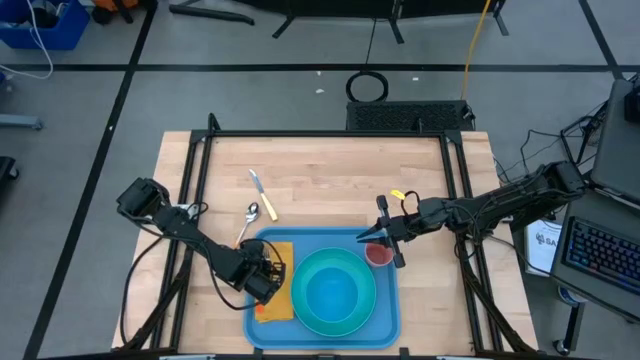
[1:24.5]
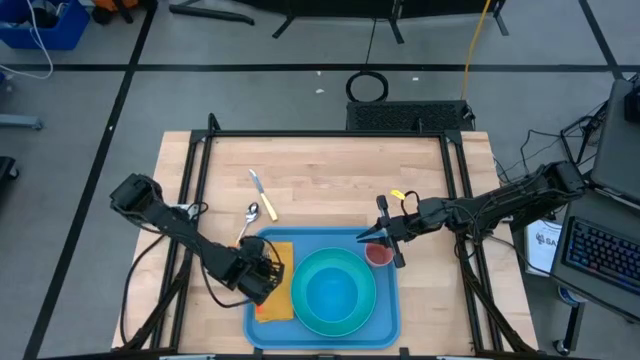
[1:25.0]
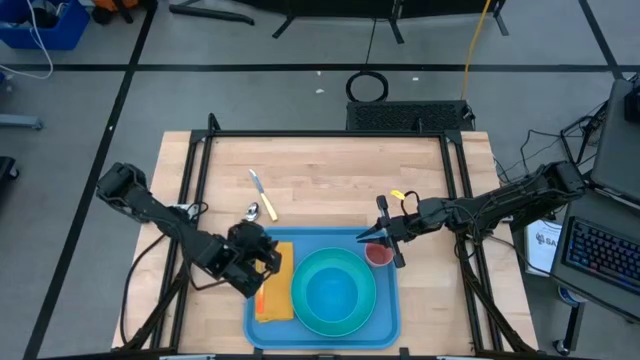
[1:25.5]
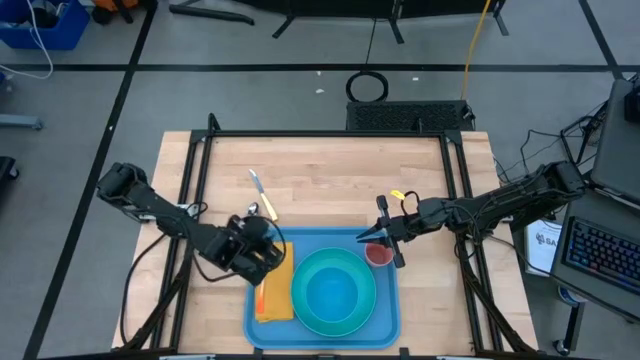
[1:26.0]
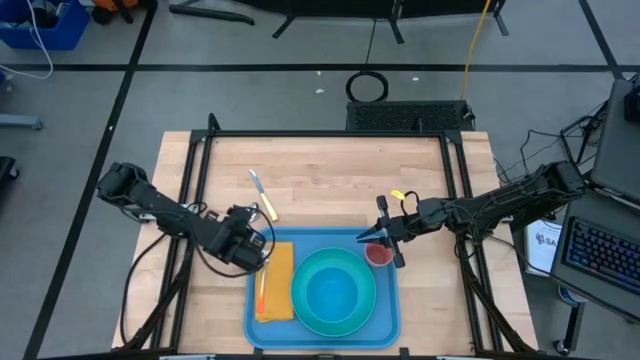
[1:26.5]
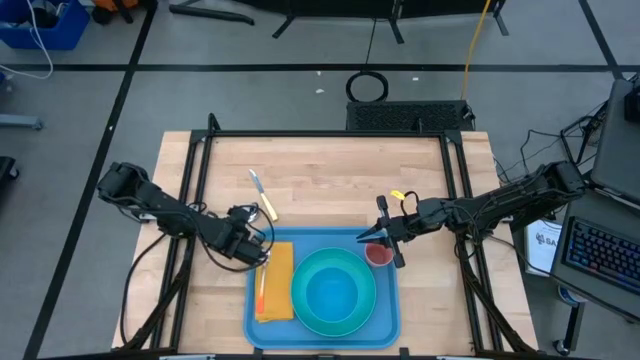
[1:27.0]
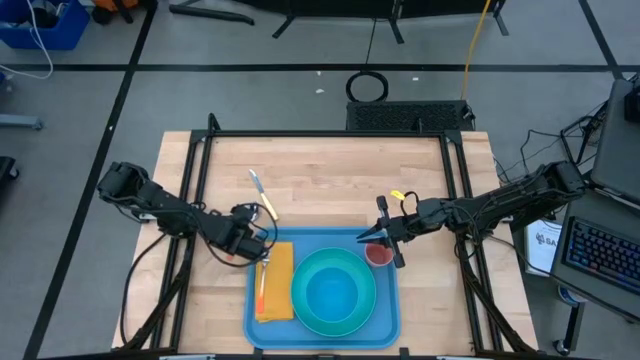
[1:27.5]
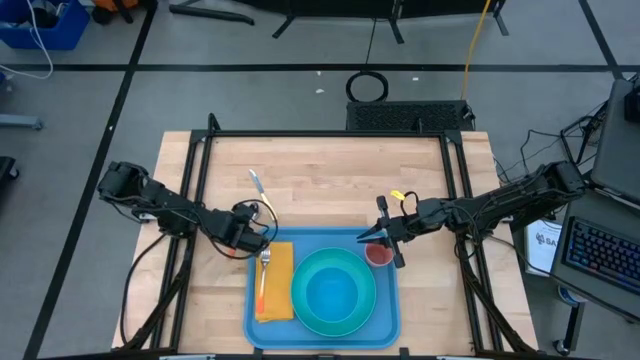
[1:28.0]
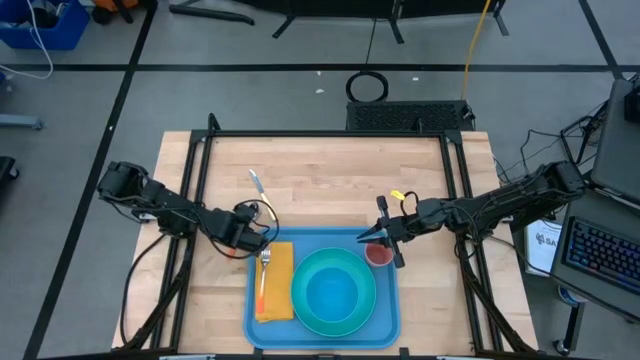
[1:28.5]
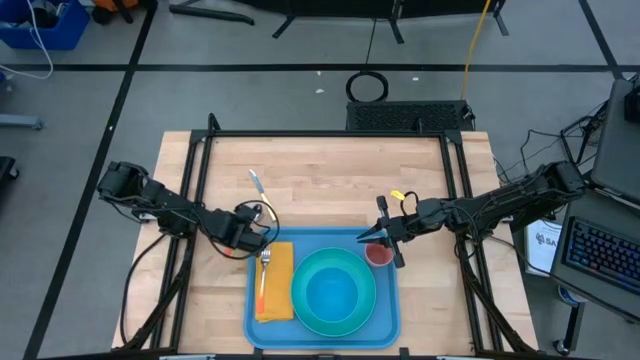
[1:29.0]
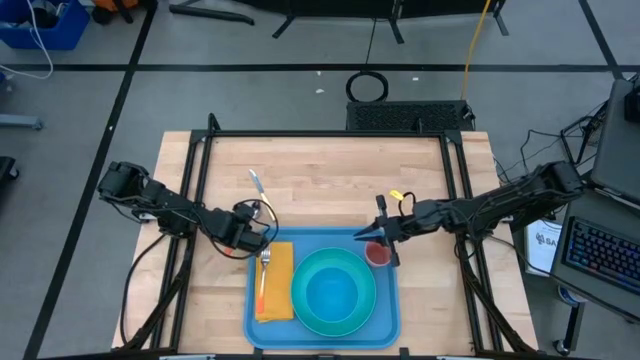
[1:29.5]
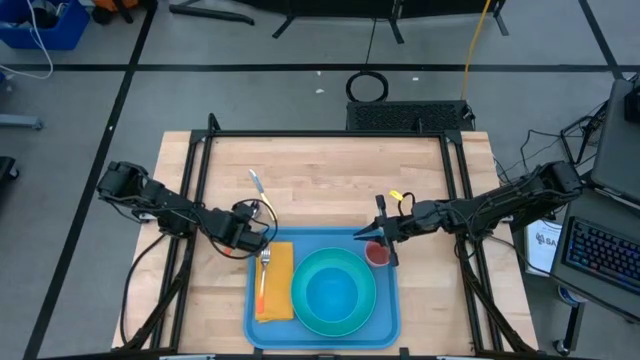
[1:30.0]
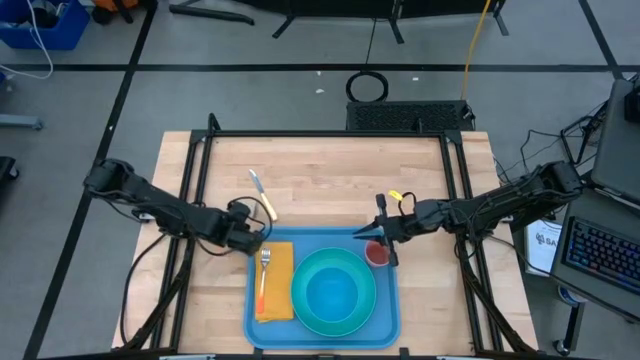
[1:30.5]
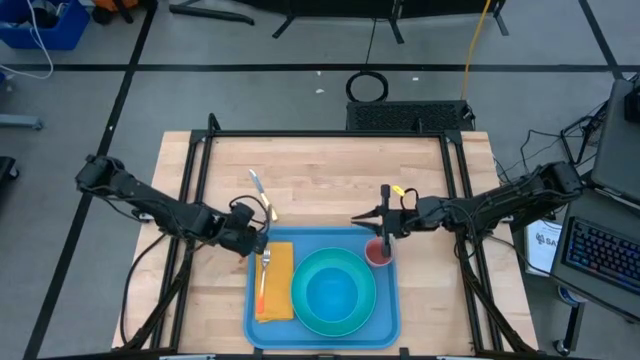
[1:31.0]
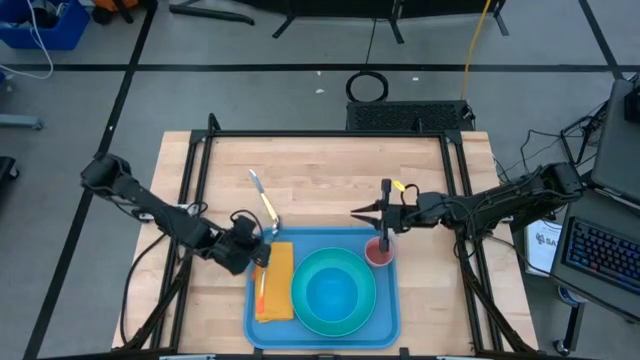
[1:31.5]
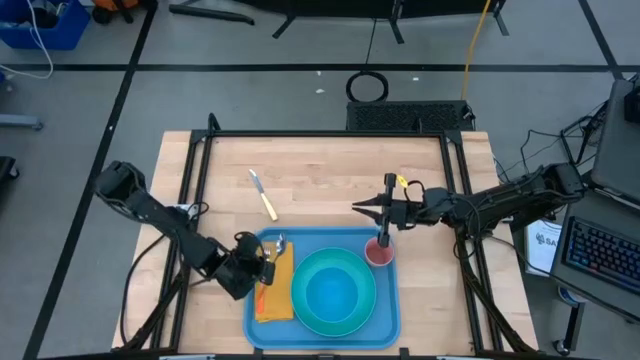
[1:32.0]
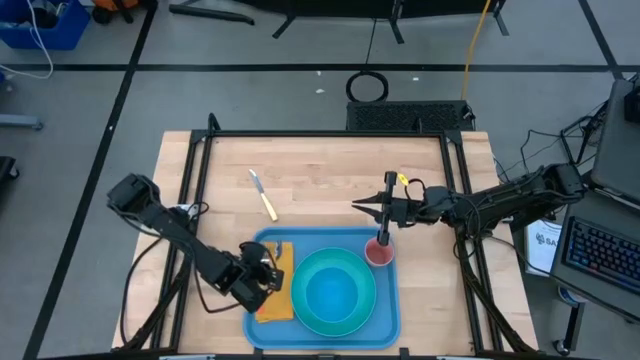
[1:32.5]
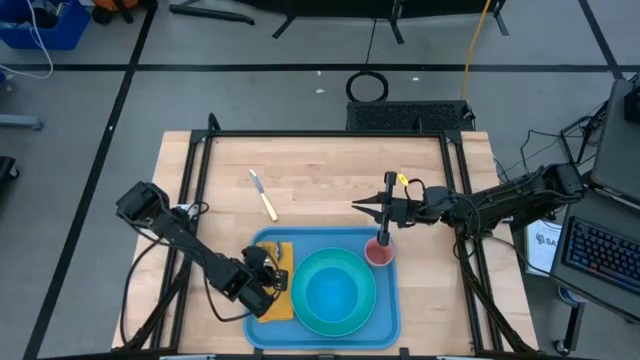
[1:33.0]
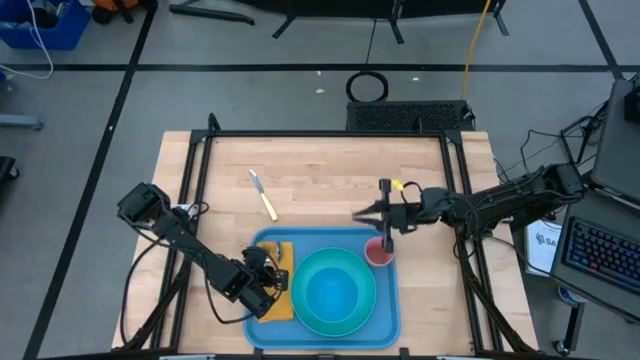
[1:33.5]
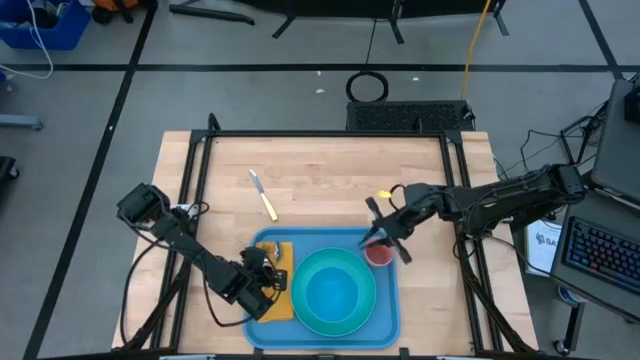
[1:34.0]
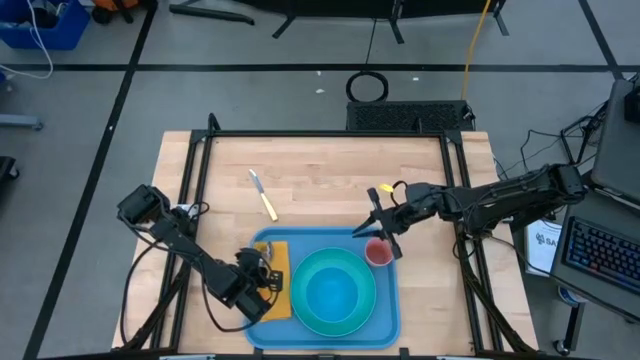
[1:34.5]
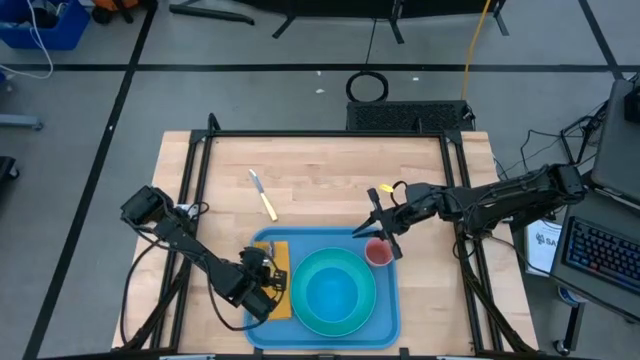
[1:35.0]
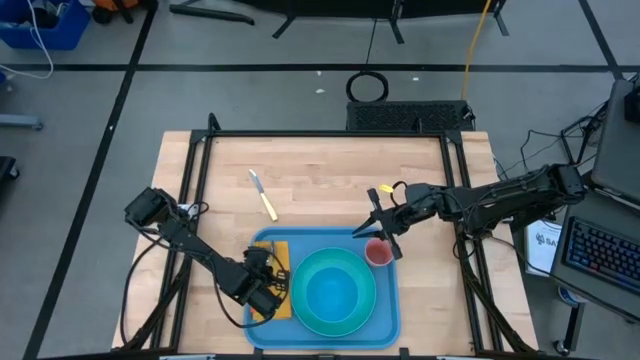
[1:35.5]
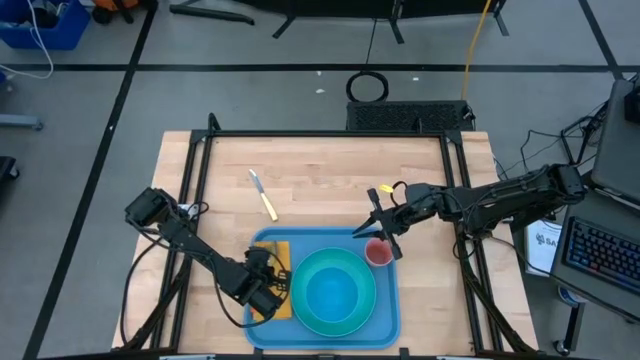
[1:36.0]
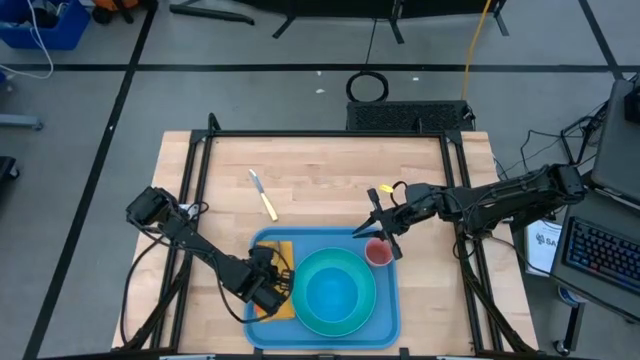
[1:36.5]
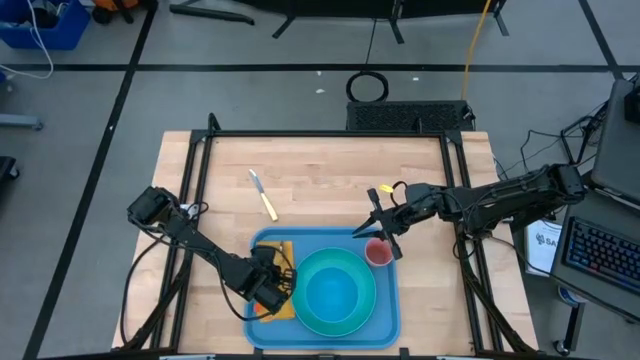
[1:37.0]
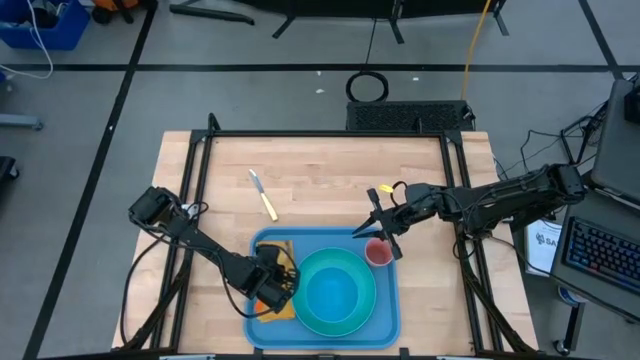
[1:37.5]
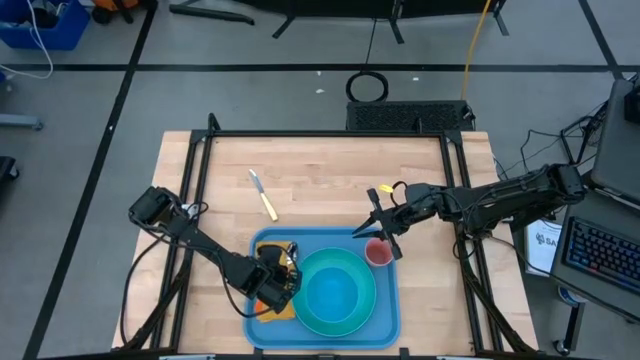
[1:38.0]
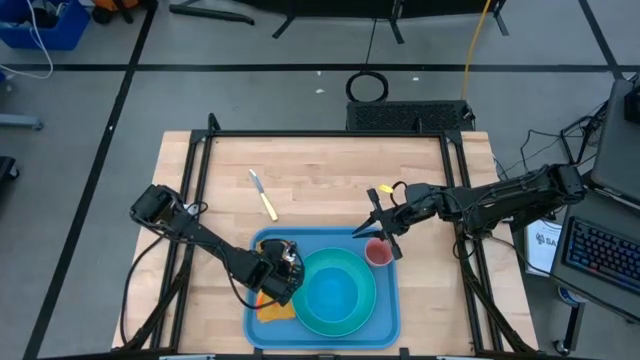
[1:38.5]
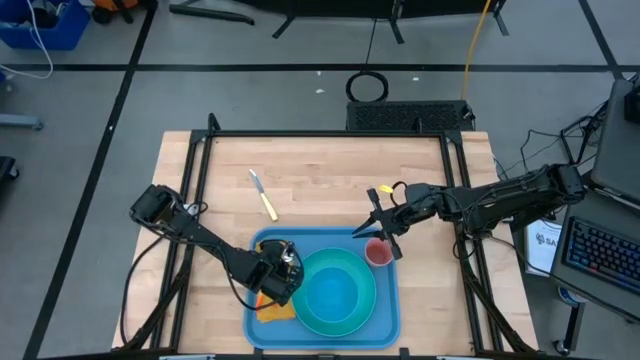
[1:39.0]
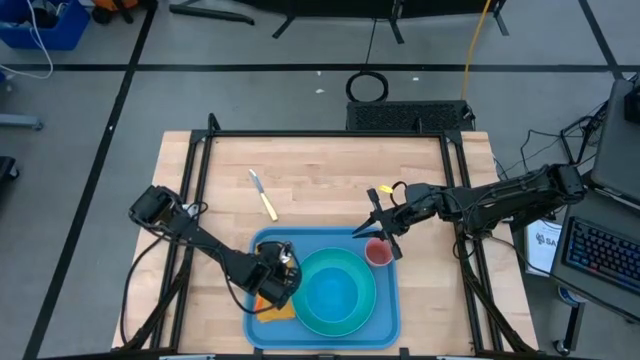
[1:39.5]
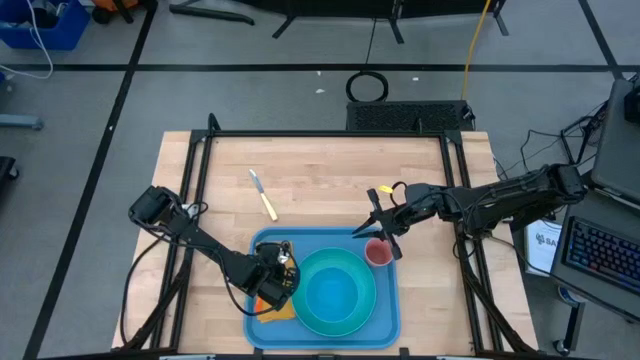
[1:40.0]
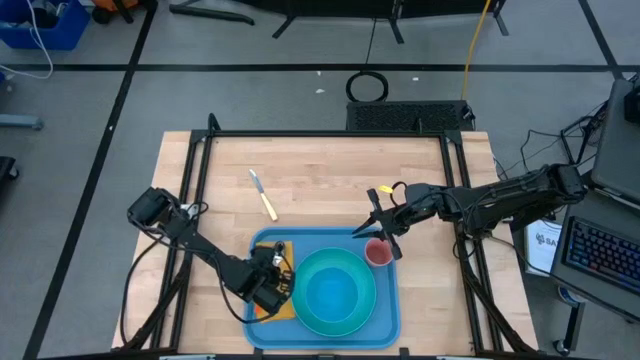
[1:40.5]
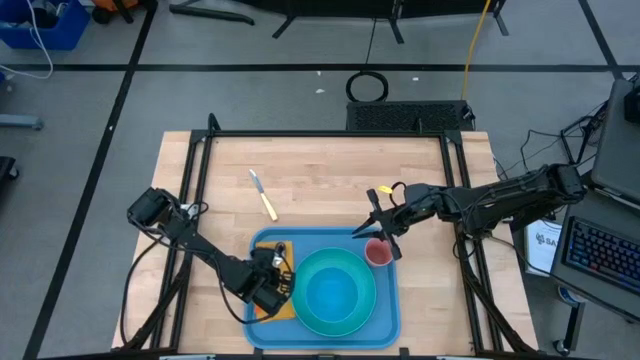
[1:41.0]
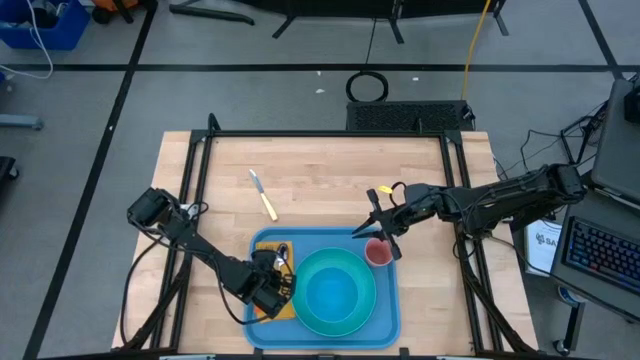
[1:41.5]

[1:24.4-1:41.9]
Task: Set up tray
Put the orange spoon on the yellow napkin to the right of the orange fork

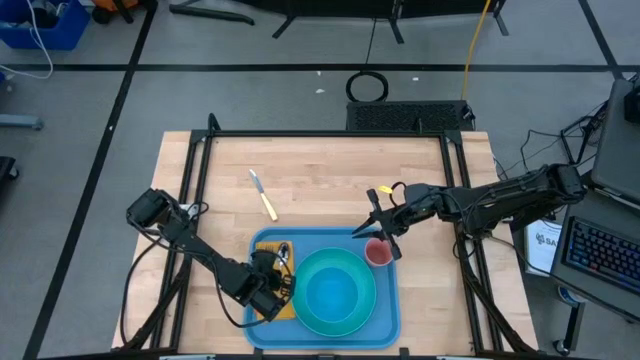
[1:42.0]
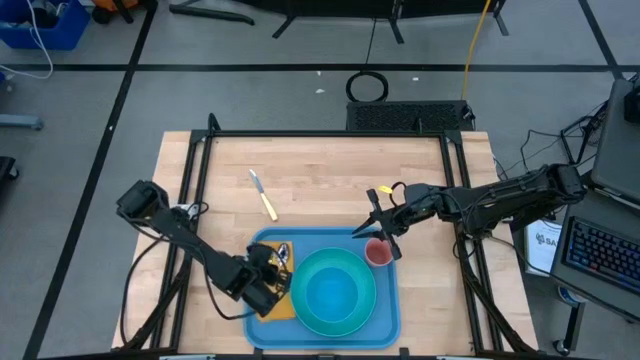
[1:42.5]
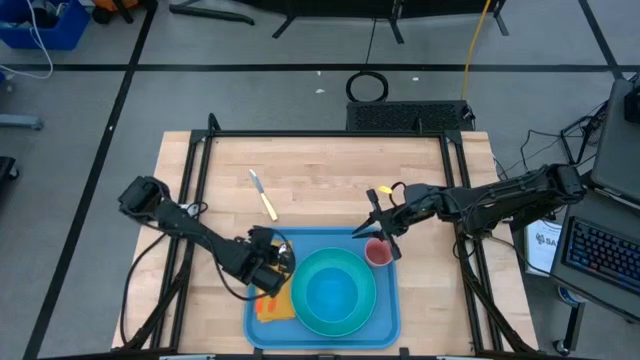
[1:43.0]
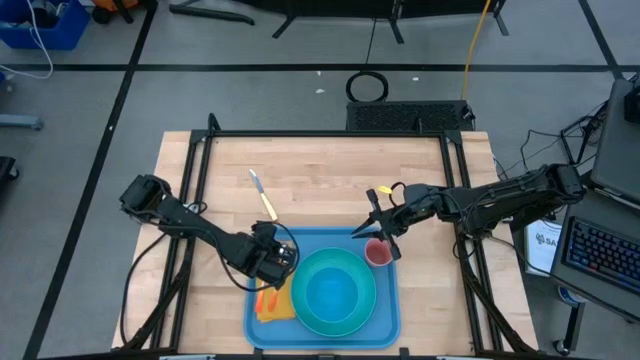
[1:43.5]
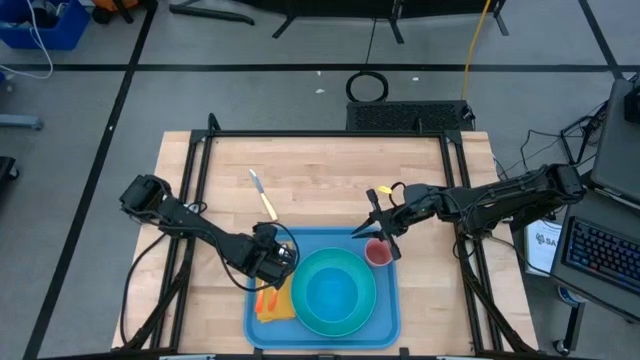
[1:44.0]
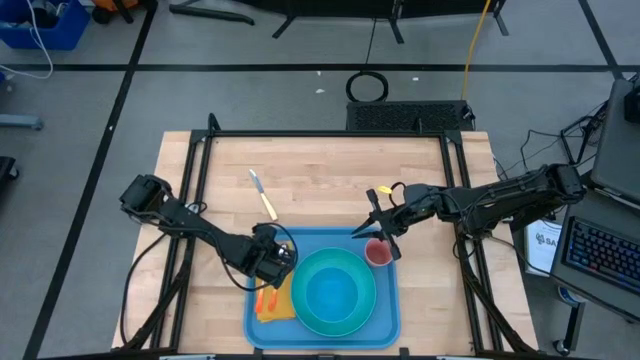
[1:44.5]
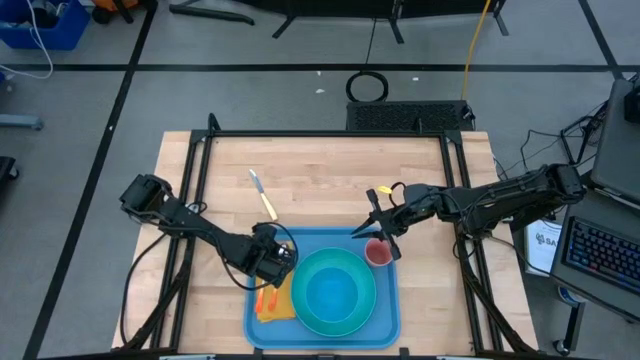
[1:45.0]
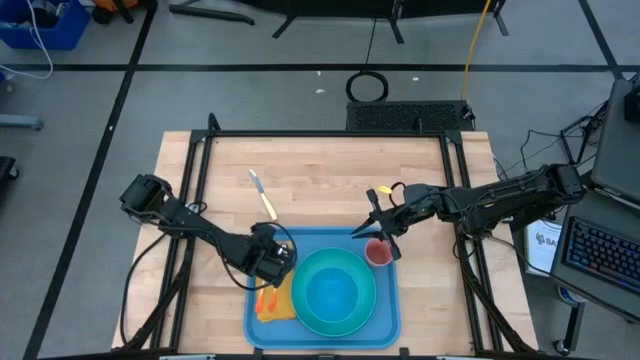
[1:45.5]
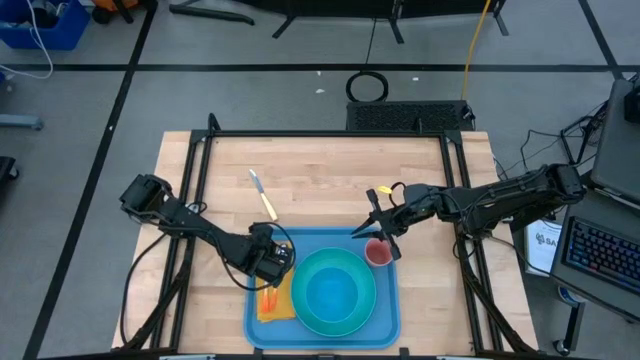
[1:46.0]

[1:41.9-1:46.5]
Adjust the orange fork on the yellow napkin
